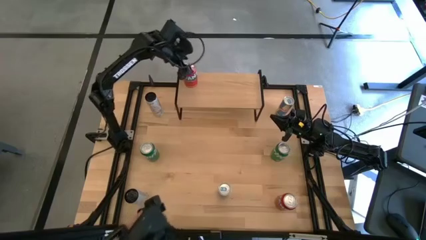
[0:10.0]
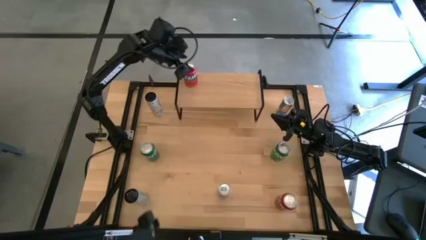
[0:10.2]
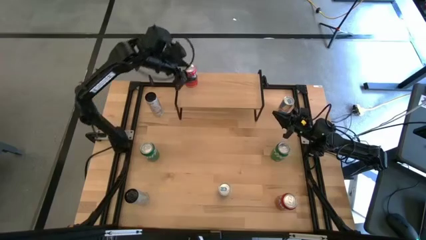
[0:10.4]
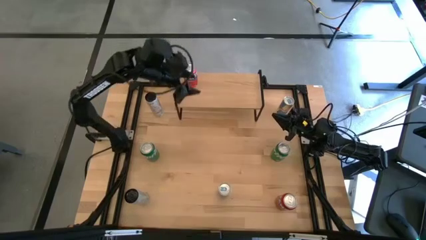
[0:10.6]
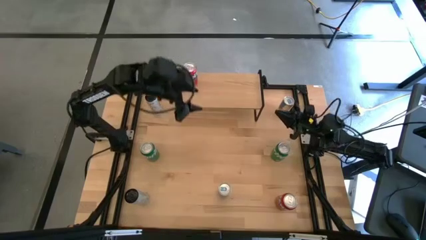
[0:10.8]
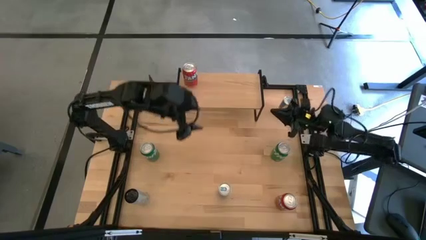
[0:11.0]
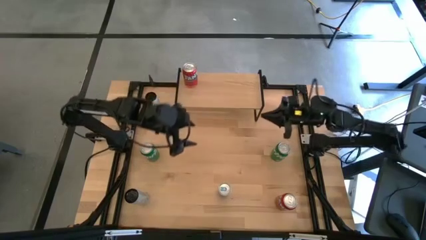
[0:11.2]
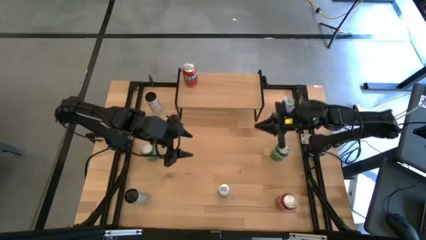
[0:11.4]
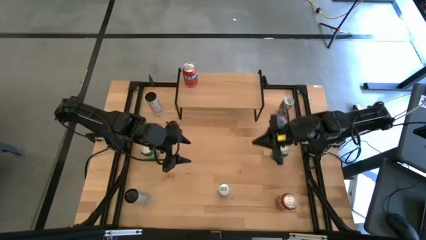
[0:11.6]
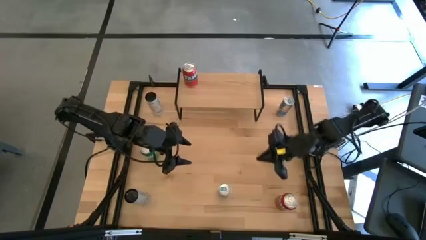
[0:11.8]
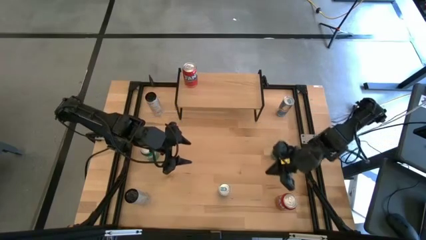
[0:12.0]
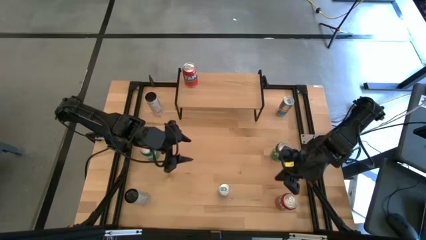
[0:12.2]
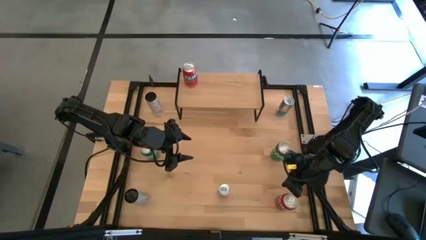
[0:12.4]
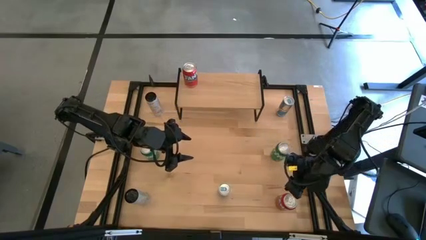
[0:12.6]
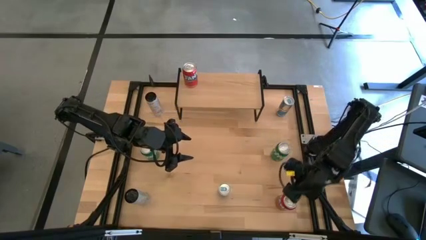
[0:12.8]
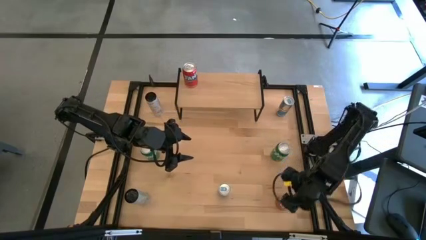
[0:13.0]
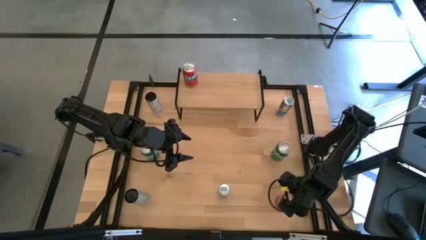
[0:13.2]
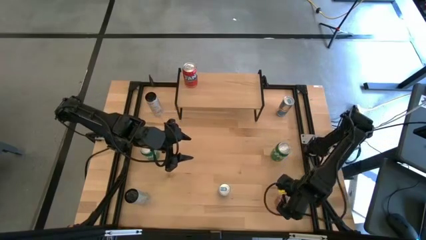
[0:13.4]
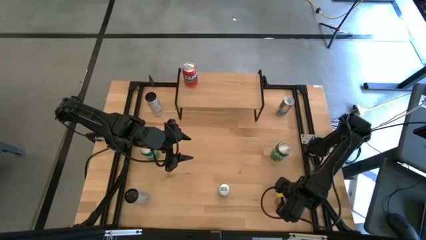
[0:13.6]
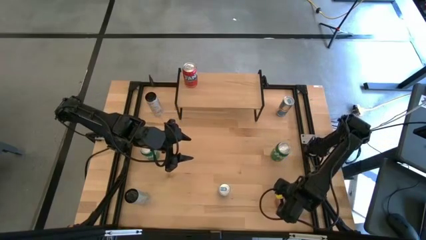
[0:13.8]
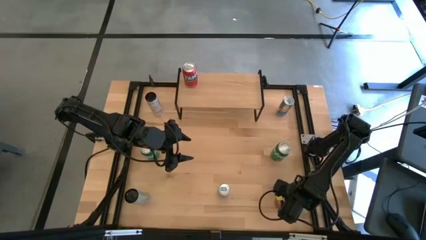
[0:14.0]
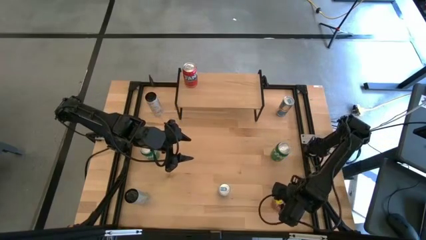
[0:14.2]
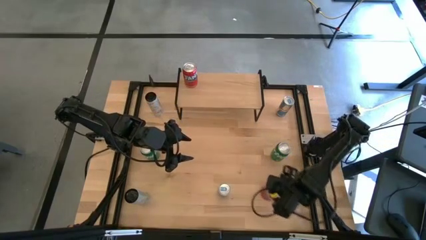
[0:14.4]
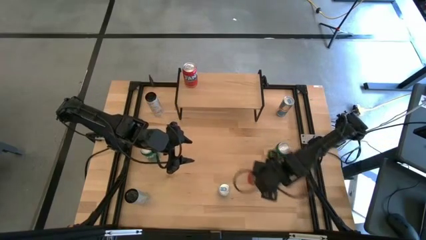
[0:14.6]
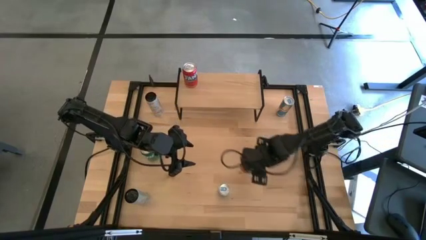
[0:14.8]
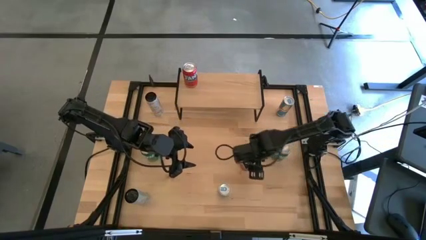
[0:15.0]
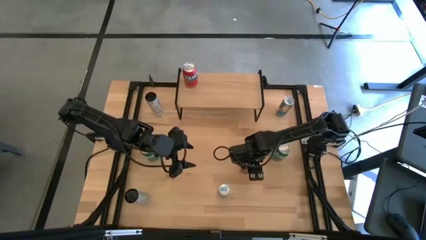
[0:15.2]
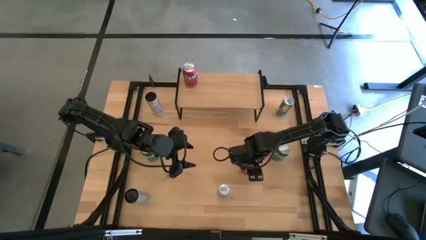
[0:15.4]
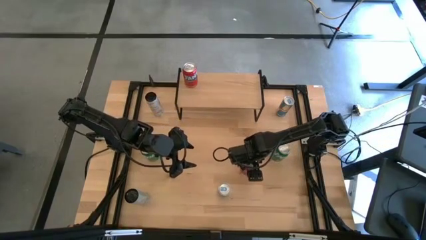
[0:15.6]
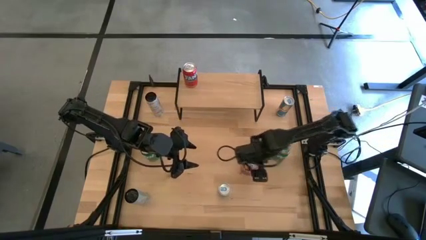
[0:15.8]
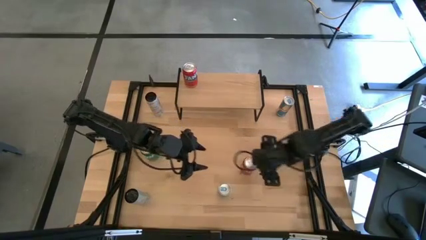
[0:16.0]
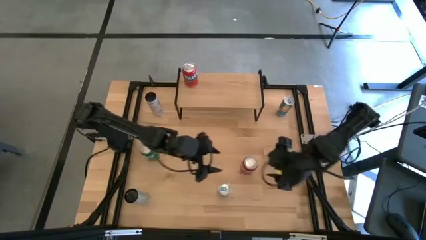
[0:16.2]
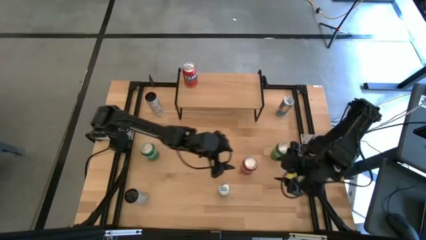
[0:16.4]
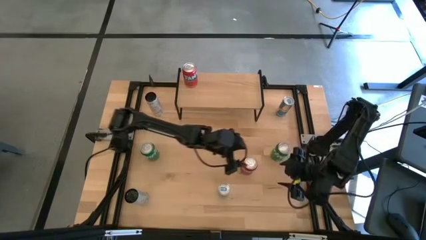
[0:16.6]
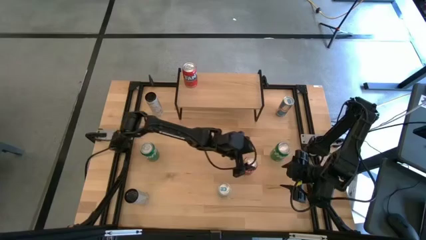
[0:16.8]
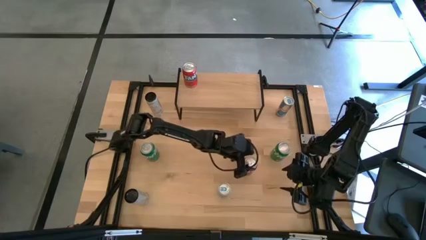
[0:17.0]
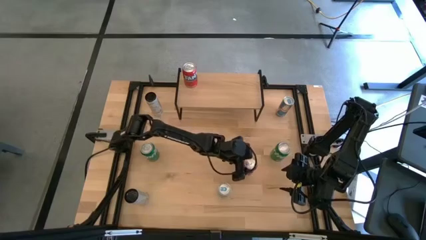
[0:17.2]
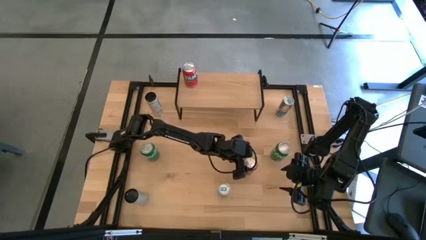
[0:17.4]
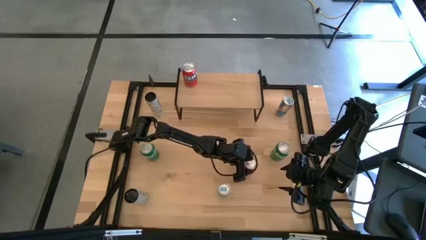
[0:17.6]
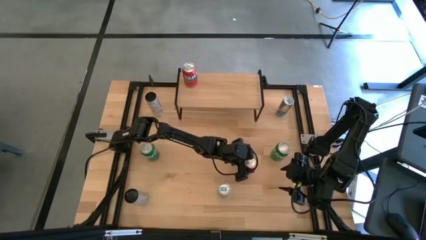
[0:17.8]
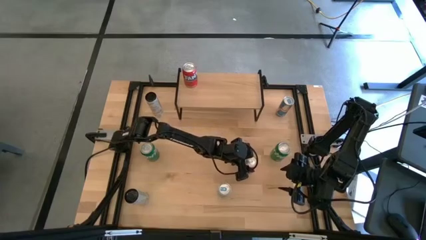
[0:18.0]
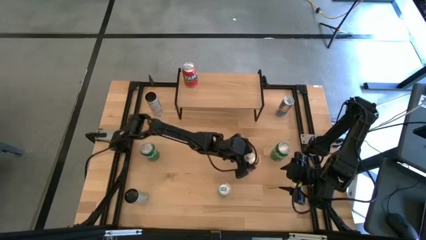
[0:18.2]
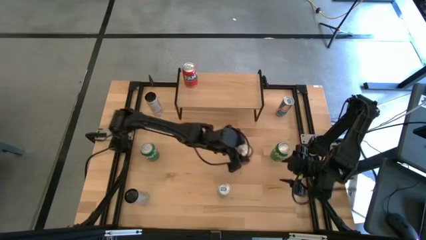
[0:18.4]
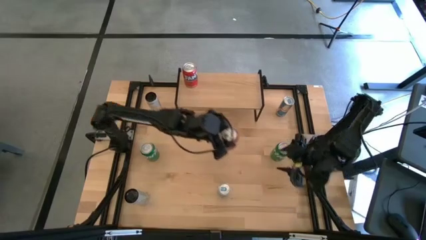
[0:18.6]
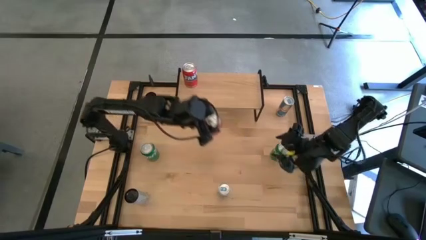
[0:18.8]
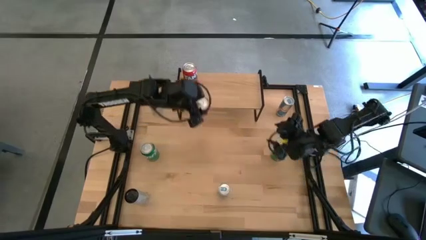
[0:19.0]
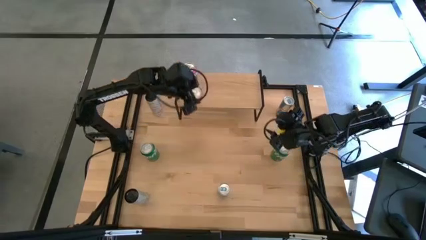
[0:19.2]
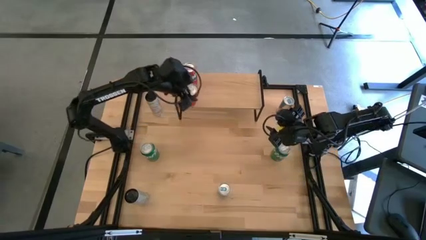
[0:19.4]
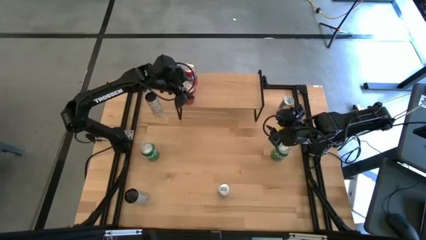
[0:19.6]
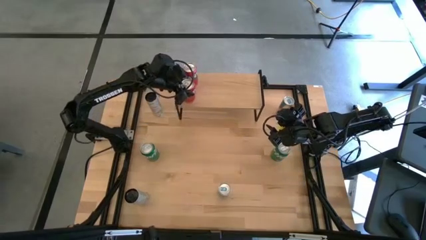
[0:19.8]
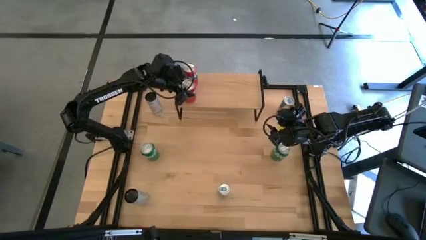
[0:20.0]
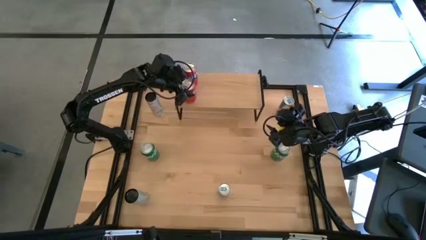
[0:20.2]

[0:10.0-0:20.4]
Task: Place canned beverage on shelf
Put the red soda can on the shelf aligned with the other red soda can

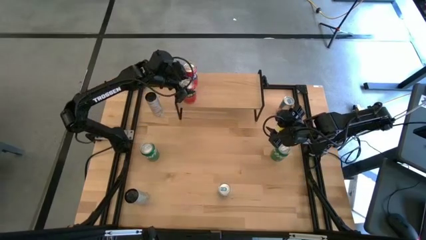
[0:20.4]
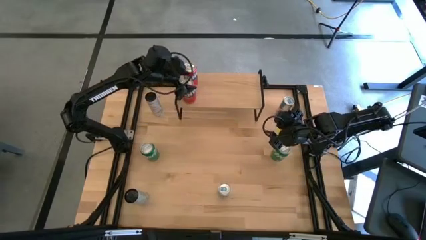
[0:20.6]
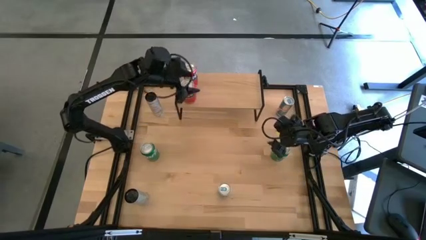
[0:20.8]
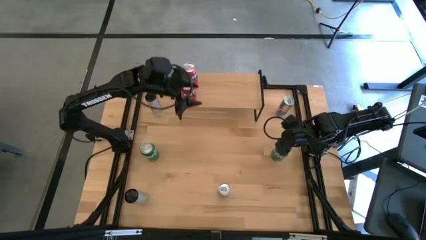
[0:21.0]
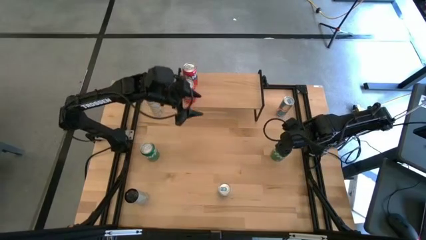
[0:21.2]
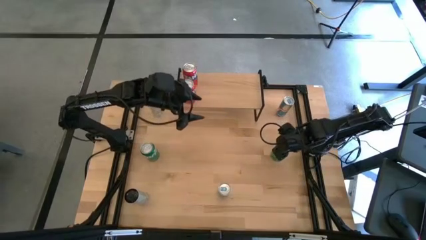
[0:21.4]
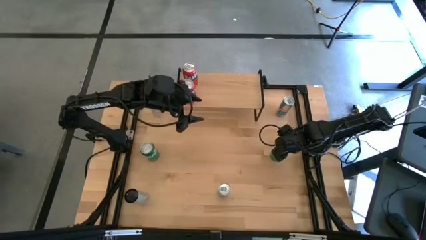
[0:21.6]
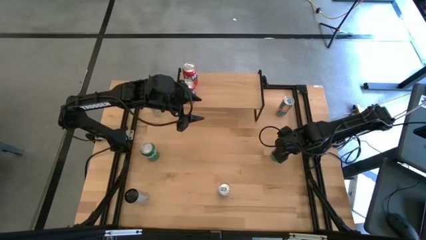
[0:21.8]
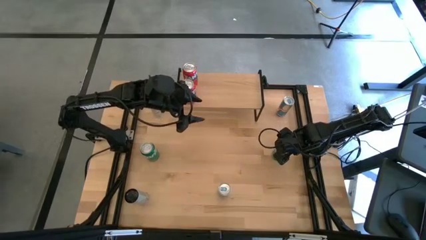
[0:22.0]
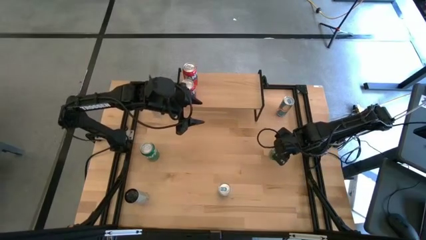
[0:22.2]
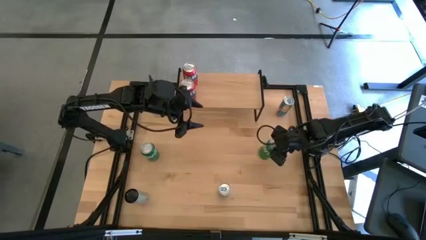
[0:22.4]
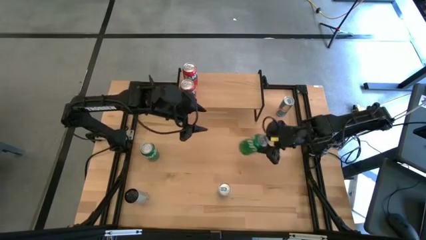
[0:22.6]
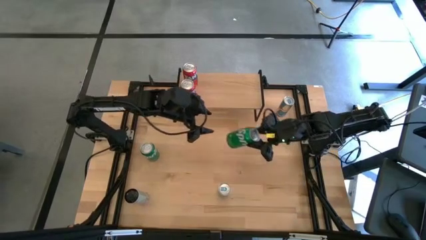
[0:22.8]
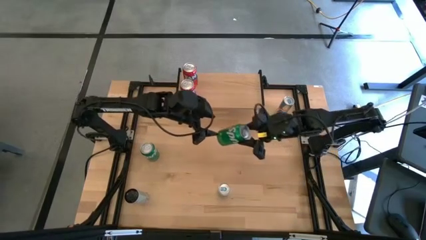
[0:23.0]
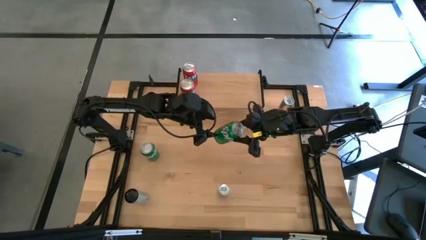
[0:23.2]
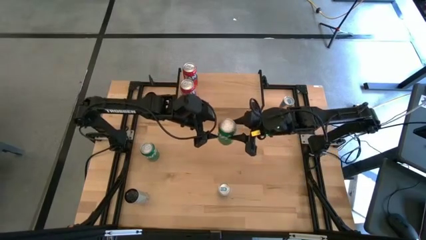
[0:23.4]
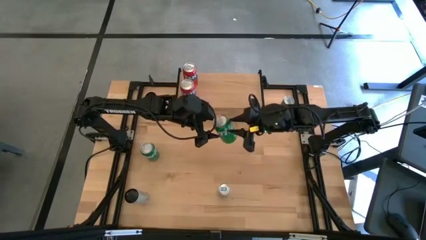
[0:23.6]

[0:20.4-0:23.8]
Put the right green soda can on the shelf
